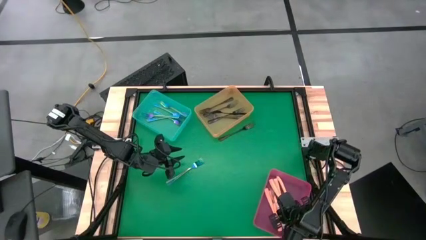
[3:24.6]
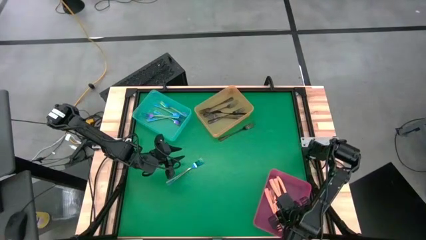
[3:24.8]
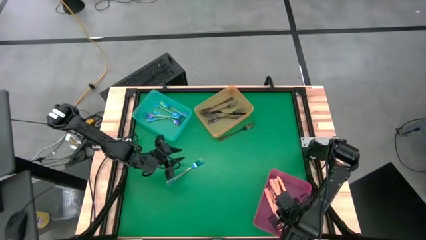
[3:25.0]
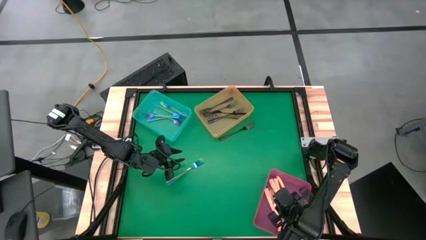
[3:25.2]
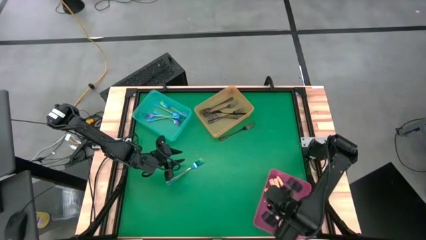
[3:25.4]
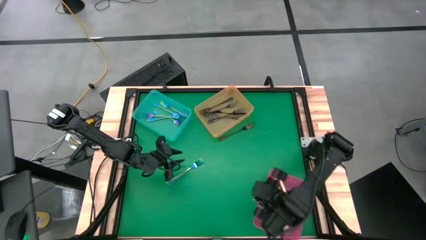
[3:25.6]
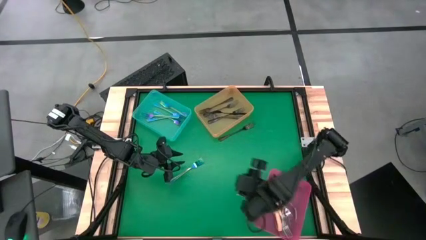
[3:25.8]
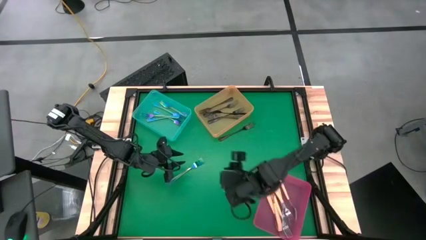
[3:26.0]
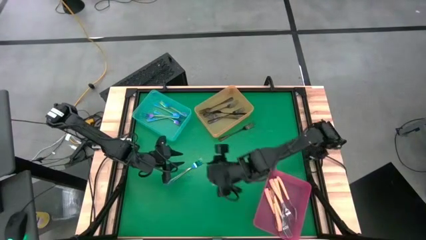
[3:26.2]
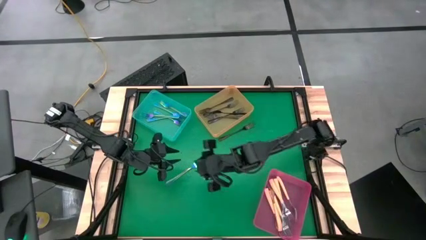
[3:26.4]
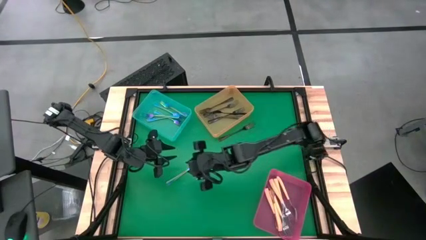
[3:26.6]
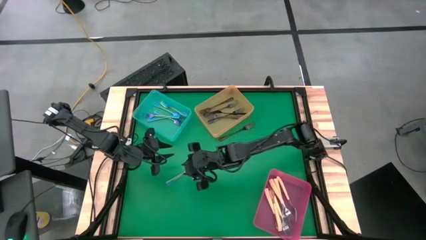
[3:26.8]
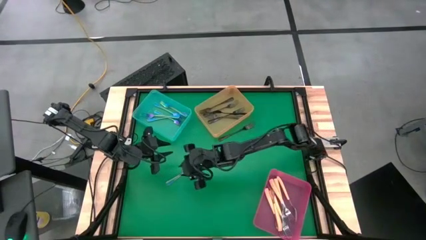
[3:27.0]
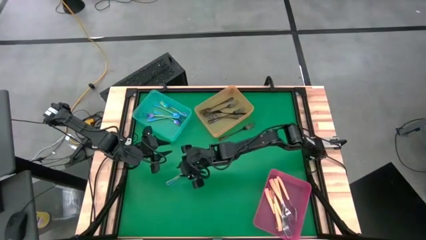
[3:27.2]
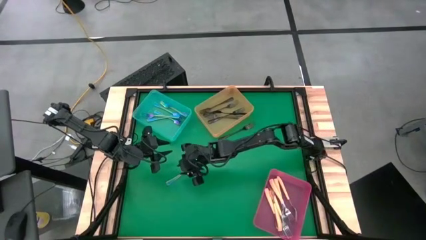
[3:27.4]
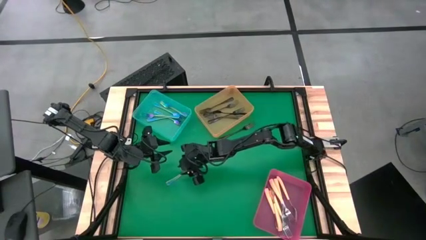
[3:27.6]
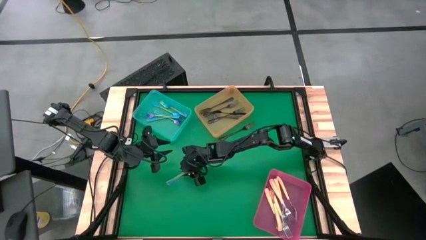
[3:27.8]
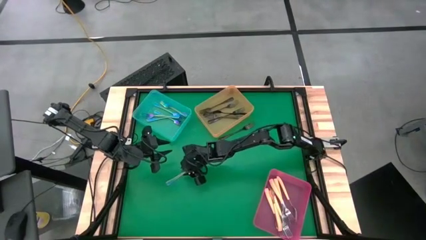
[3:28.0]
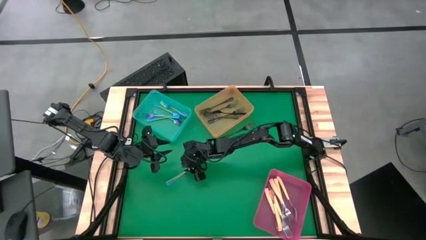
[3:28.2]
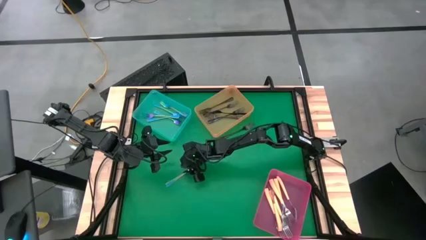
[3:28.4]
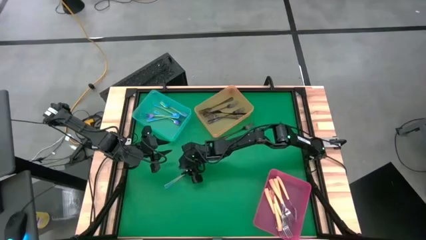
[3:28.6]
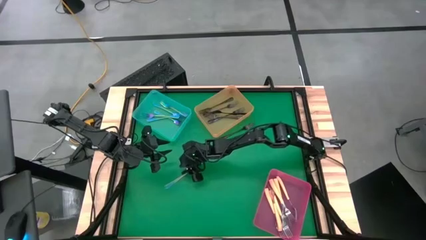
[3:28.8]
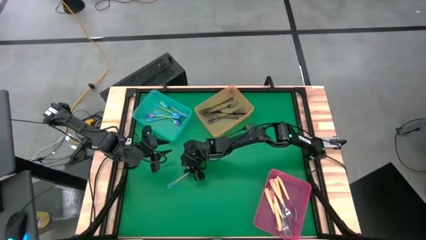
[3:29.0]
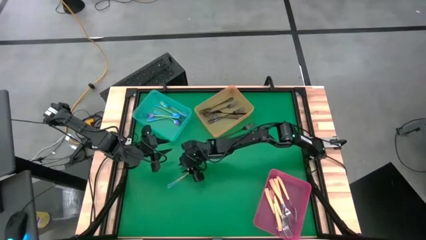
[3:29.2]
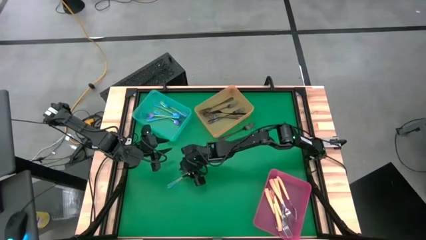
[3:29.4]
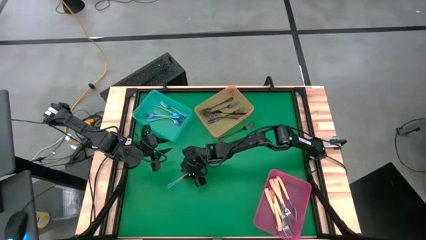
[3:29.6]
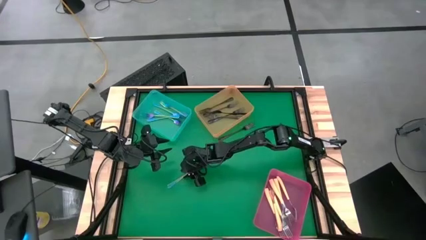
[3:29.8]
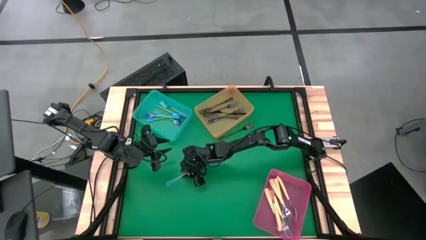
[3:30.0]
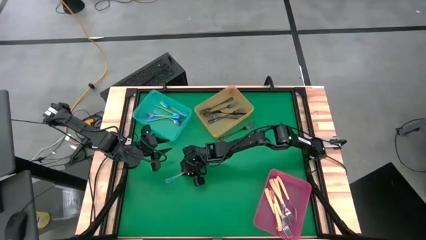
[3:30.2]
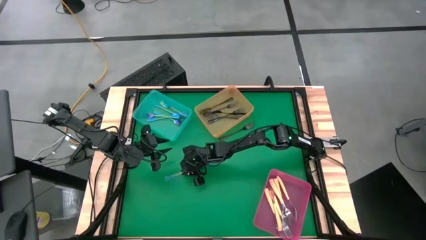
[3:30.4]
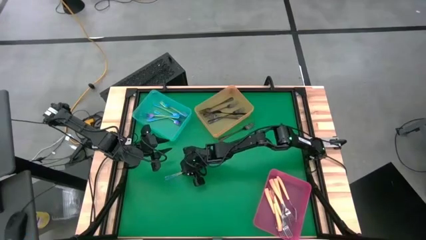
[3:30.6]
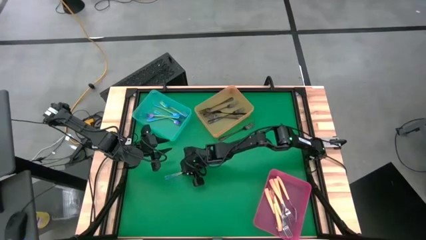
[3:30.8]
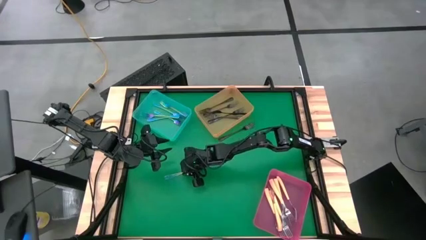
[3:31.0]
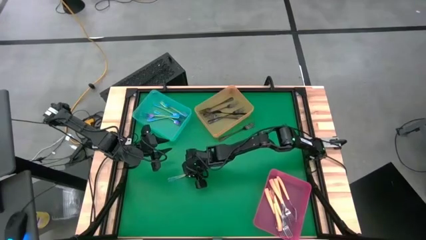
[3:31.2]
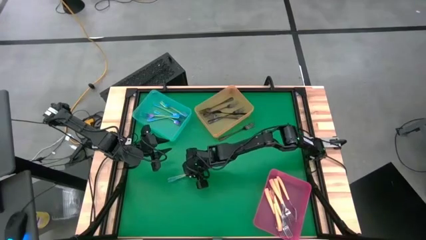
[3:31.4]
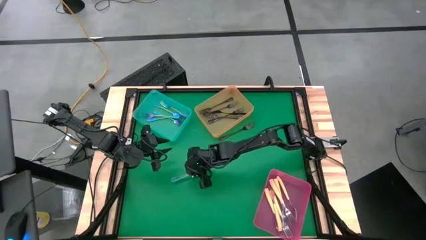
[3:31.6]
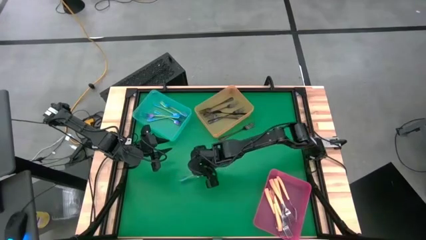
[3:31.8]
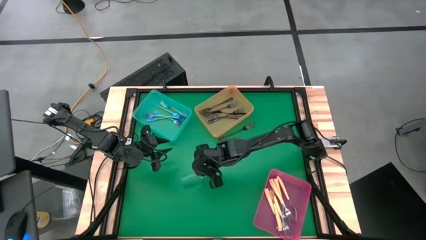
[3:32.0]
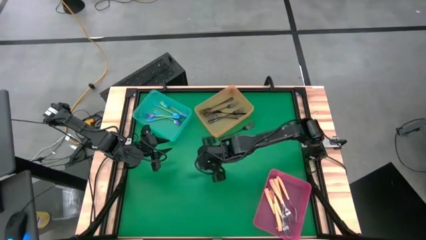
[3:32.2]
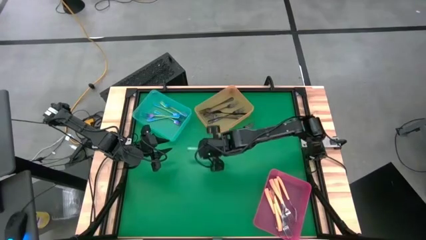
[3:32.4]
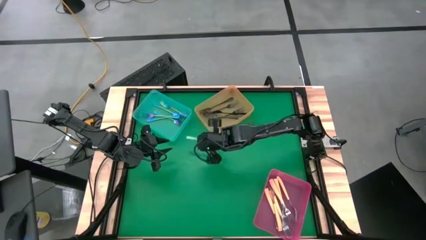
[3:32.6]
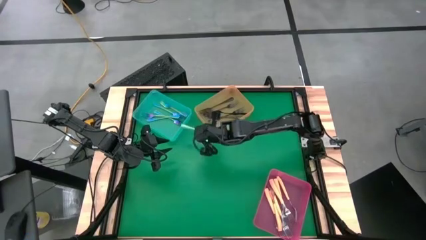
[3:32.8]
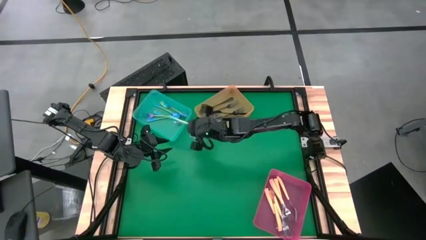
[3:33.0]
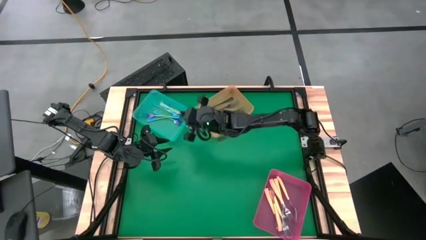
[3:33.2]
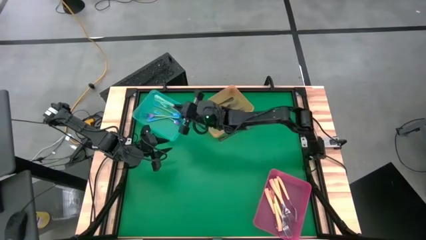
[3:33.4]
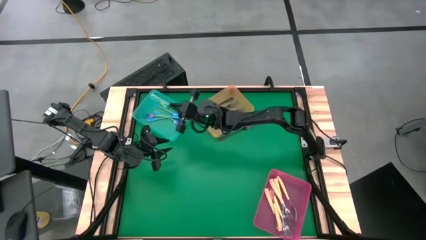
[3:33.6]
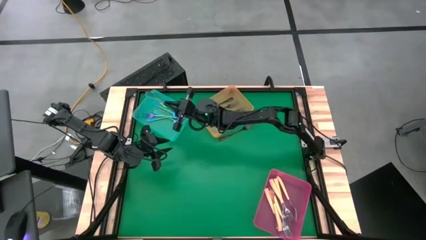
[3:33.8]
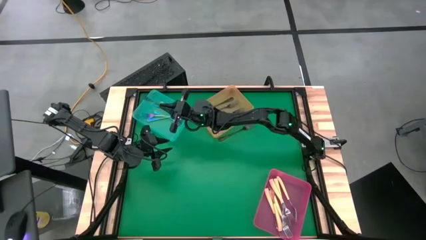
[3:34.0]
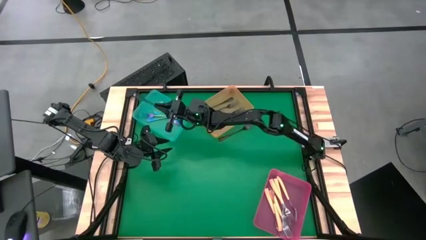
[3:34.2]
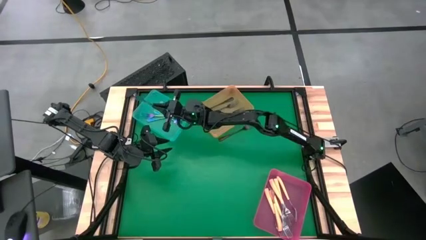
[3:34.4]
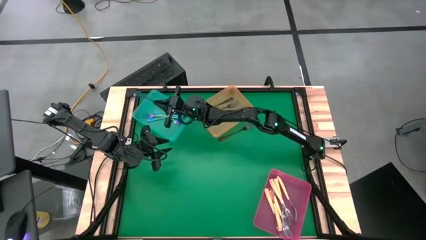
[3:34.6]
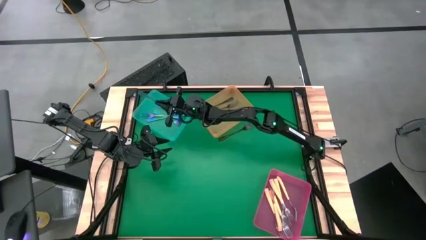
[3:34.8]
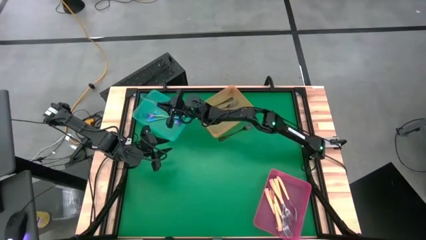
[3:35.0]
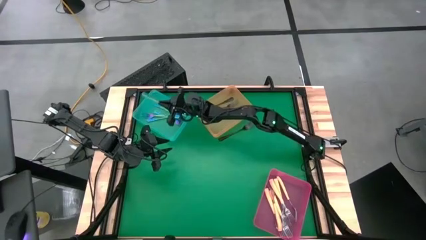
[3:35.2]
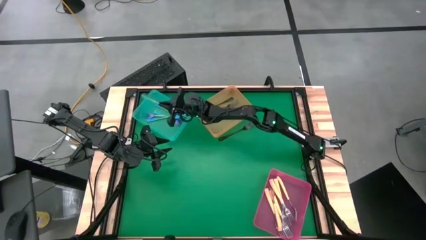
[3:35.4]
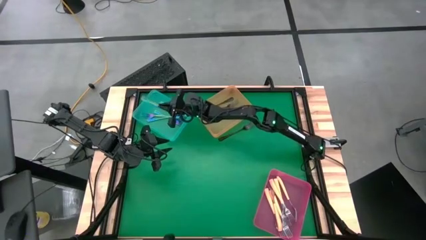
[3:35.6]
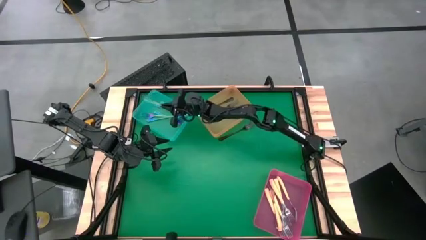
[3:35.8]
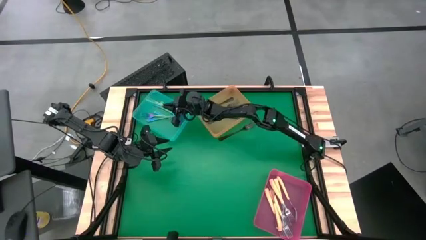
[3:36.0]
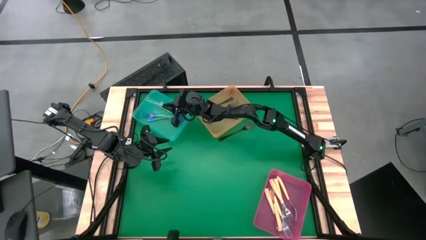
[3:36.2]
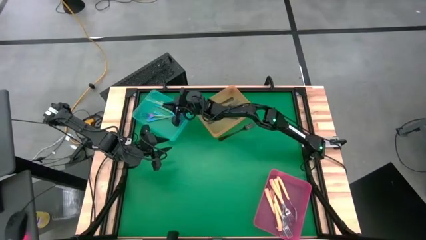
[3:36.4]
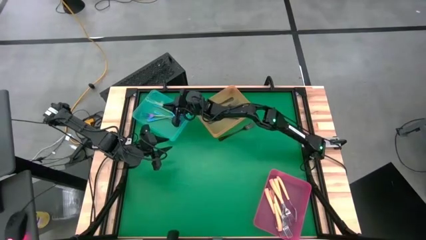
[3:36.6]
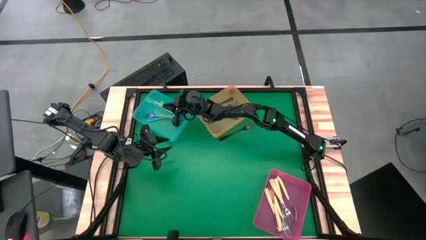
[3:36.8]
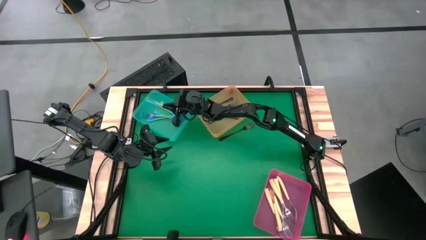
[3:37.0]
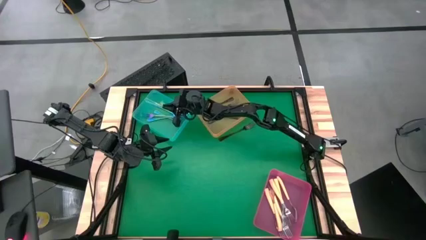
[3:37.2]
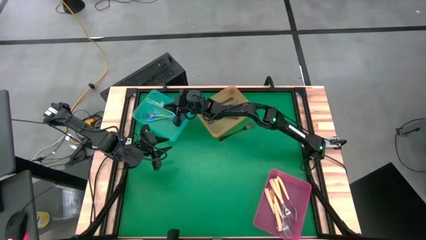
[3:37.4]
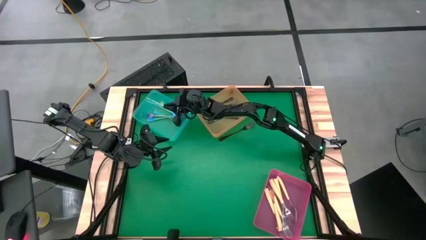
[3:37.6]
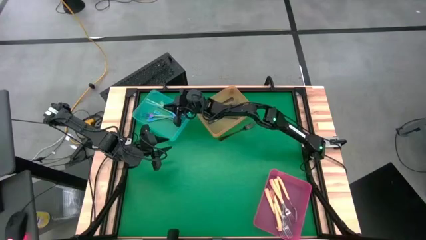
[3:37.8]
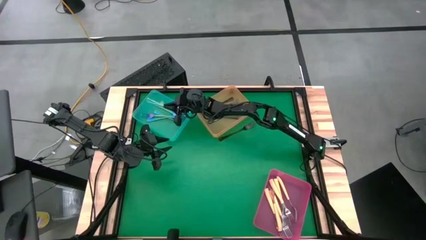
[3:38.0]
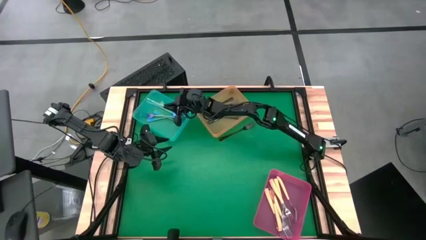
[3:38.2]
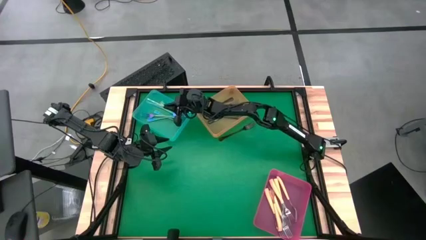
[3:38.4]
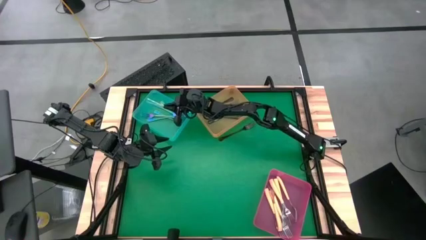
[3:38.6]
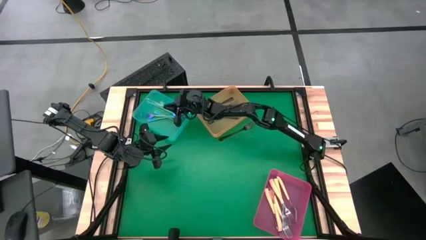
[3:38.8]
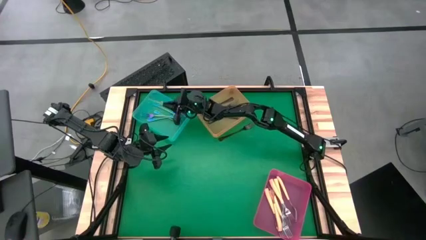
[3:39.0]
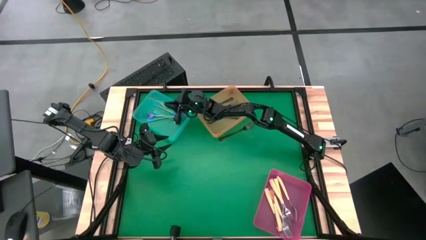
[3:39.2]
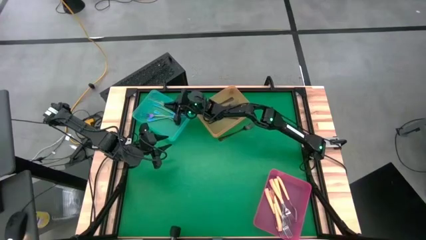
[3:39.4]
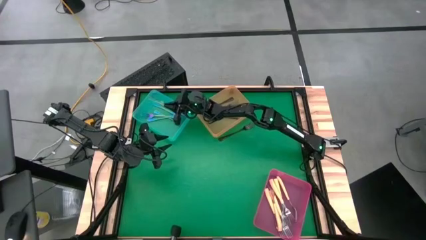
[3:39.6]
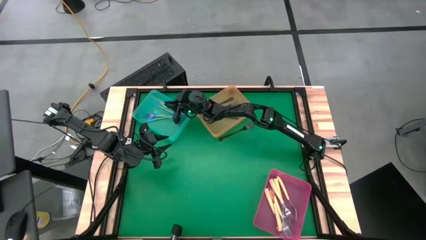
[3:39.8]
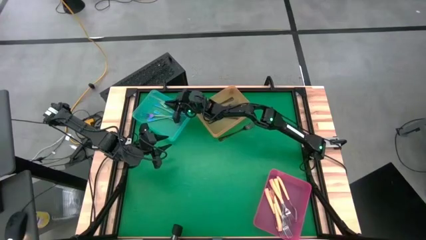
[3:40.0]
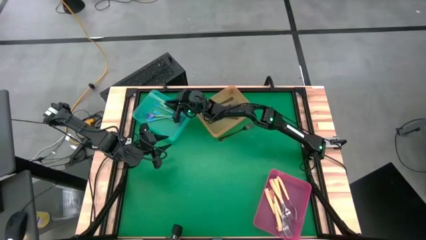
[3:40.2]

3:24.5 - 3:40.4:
Task: Sort silverware by color (type)
Put the blue fork into the blue bin
